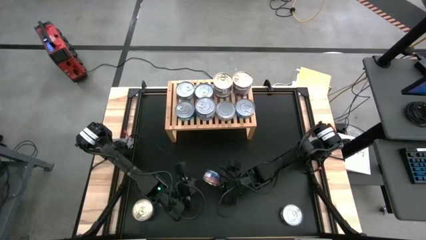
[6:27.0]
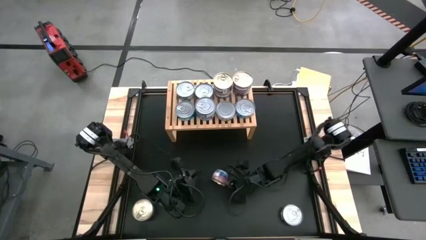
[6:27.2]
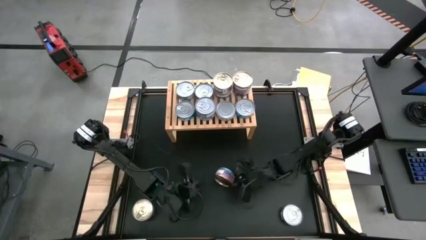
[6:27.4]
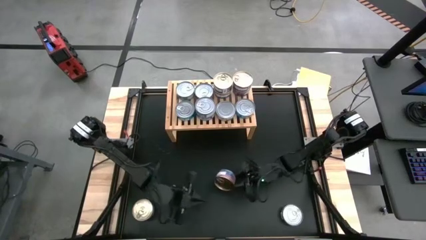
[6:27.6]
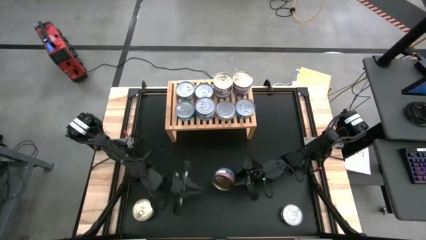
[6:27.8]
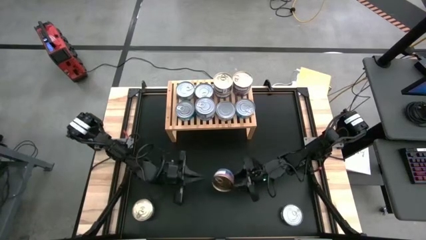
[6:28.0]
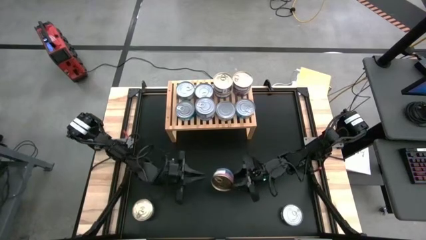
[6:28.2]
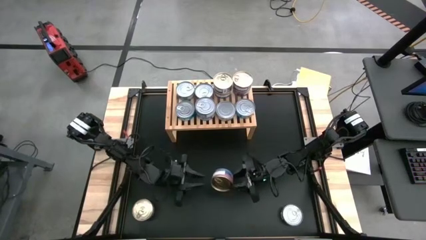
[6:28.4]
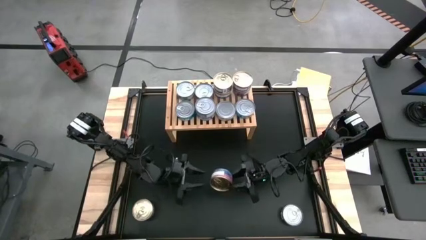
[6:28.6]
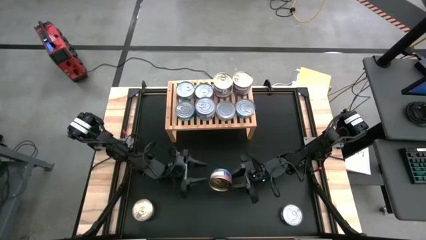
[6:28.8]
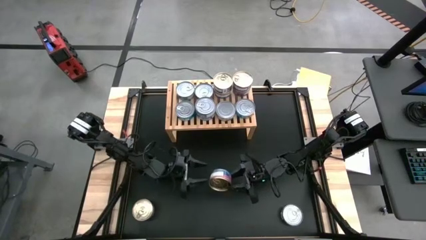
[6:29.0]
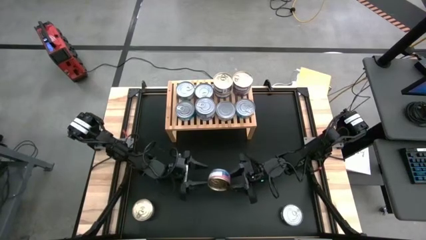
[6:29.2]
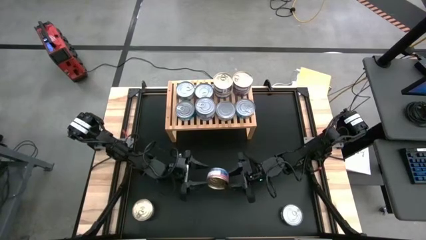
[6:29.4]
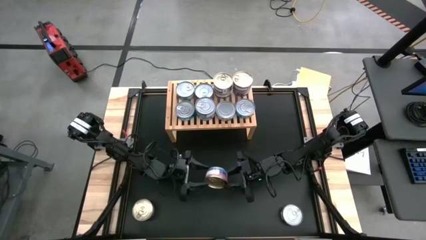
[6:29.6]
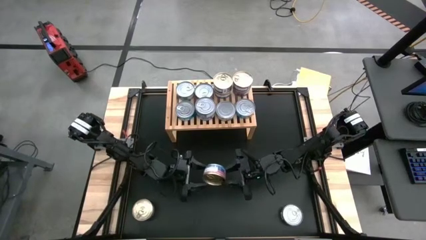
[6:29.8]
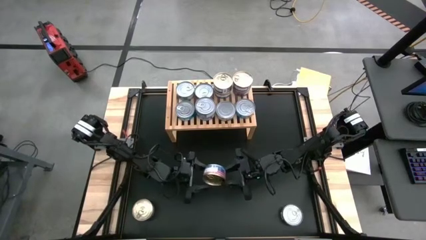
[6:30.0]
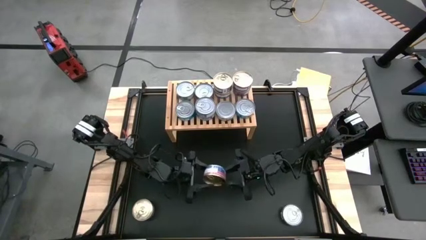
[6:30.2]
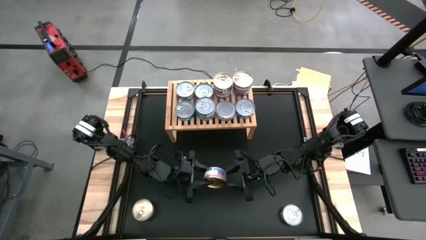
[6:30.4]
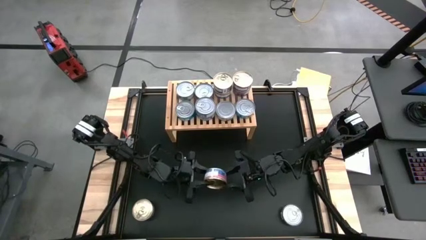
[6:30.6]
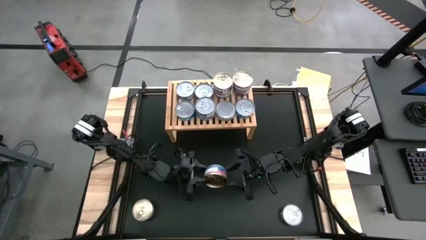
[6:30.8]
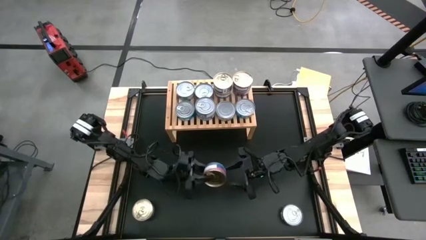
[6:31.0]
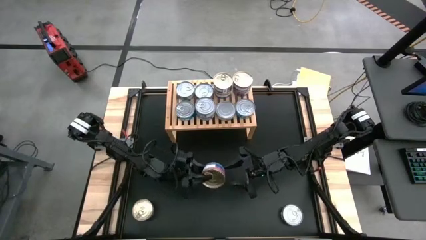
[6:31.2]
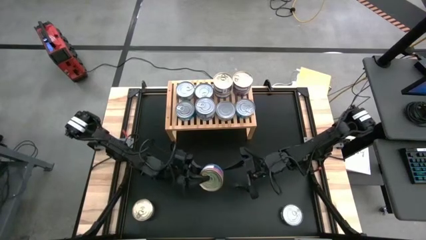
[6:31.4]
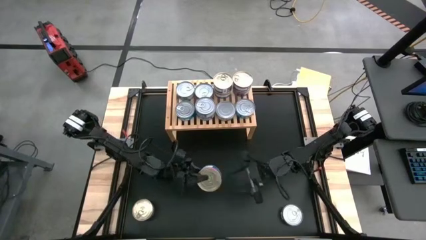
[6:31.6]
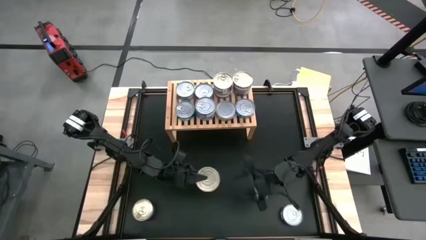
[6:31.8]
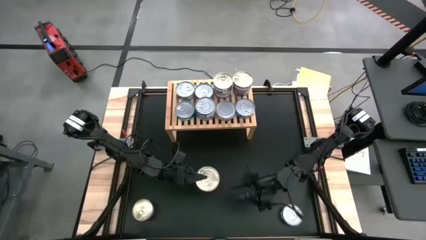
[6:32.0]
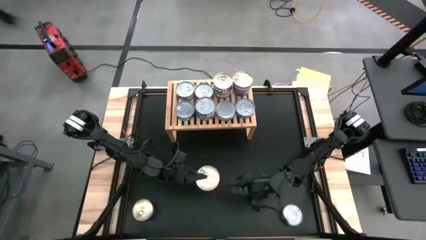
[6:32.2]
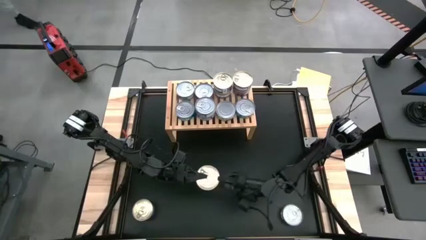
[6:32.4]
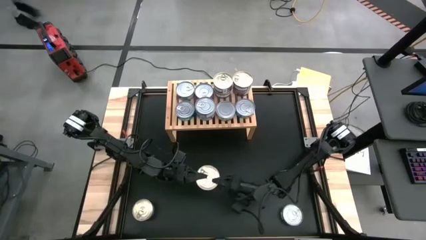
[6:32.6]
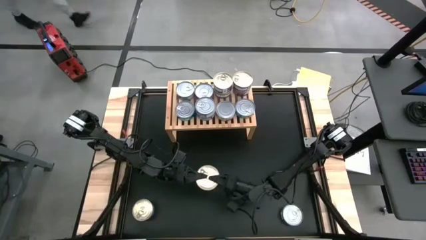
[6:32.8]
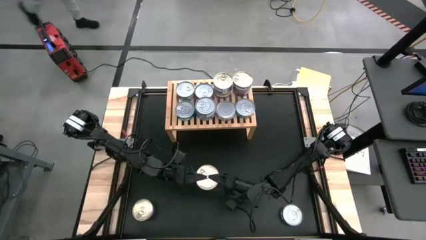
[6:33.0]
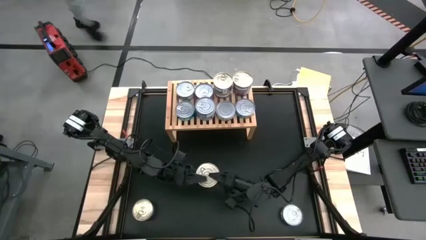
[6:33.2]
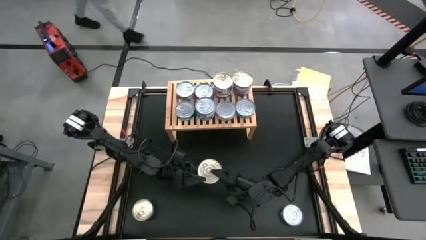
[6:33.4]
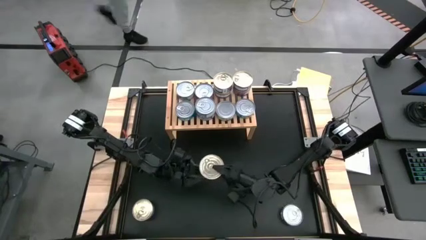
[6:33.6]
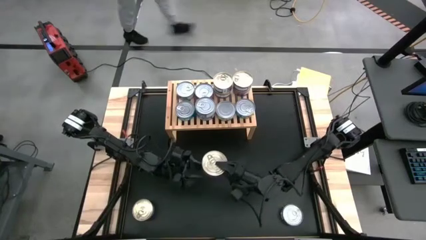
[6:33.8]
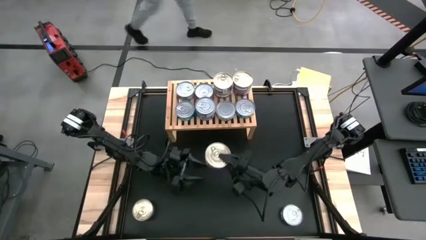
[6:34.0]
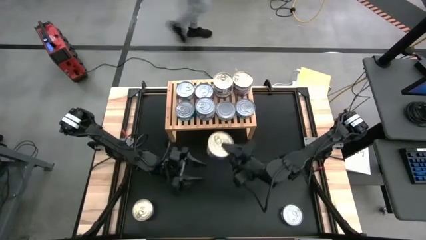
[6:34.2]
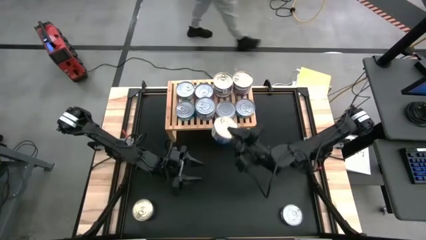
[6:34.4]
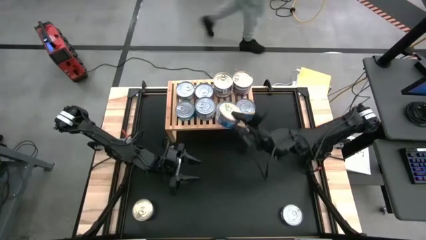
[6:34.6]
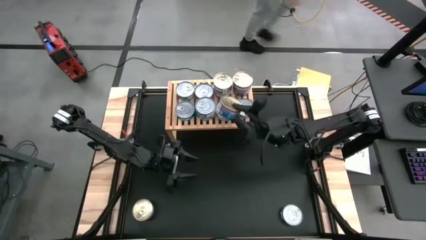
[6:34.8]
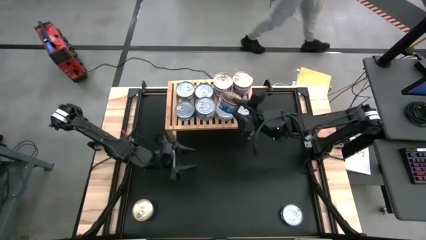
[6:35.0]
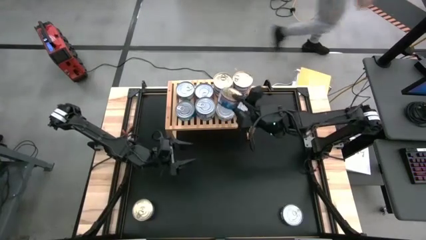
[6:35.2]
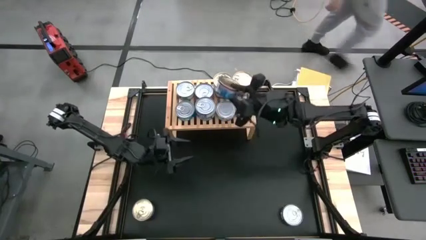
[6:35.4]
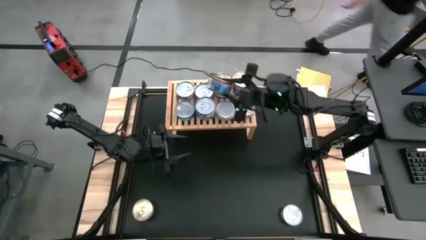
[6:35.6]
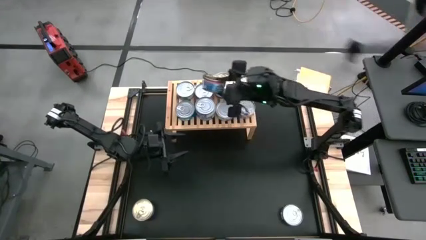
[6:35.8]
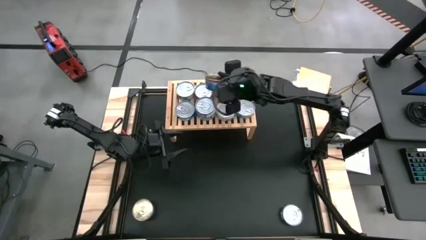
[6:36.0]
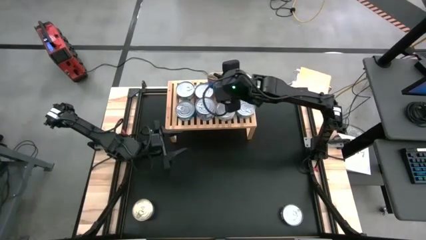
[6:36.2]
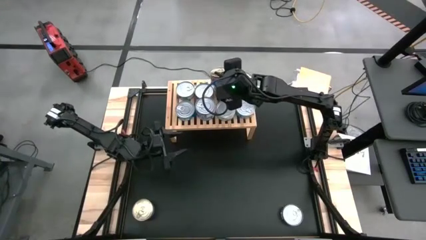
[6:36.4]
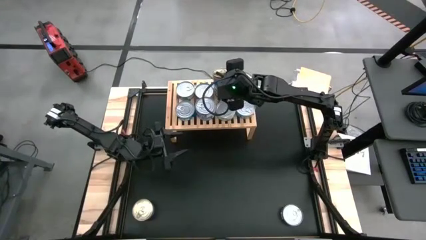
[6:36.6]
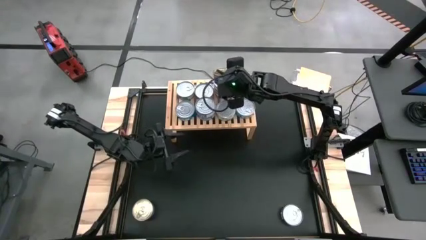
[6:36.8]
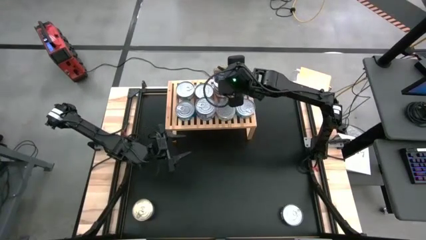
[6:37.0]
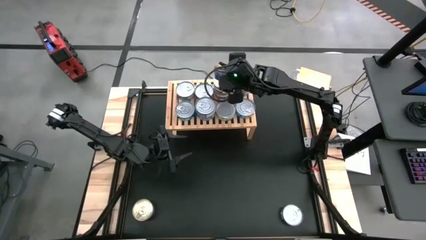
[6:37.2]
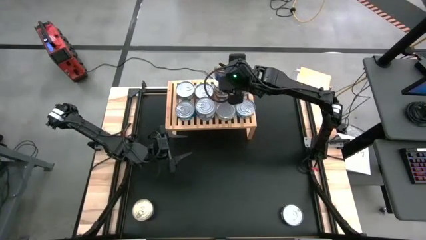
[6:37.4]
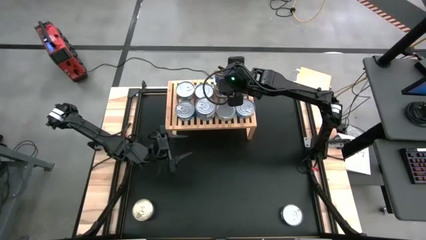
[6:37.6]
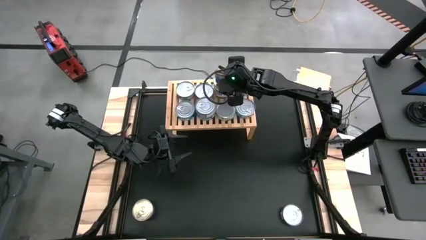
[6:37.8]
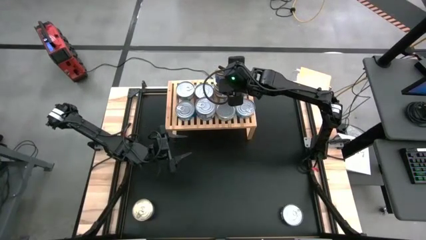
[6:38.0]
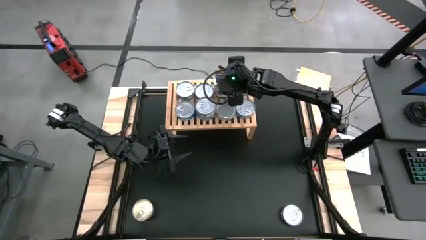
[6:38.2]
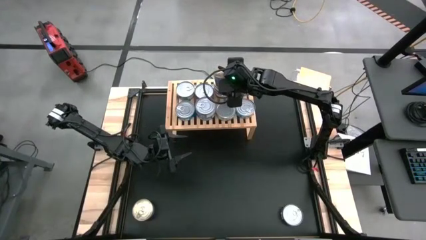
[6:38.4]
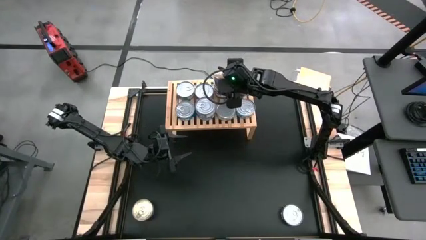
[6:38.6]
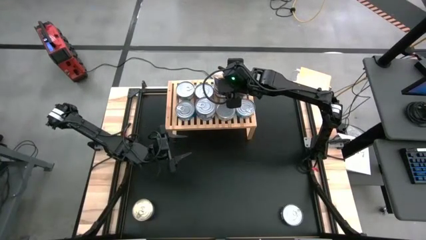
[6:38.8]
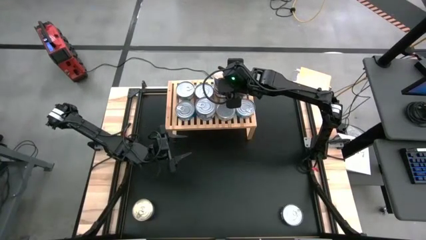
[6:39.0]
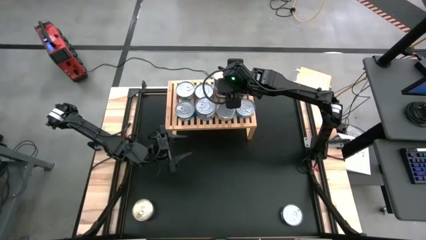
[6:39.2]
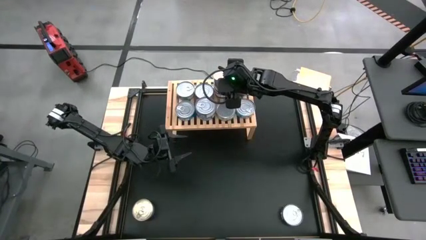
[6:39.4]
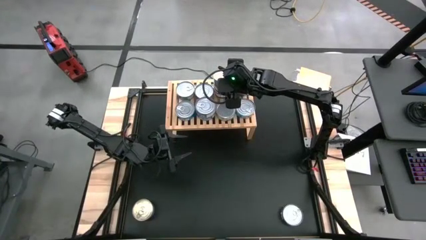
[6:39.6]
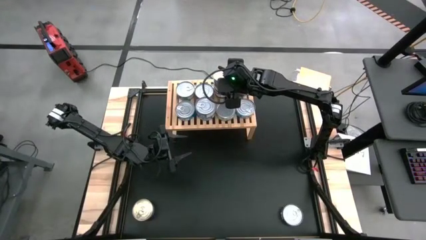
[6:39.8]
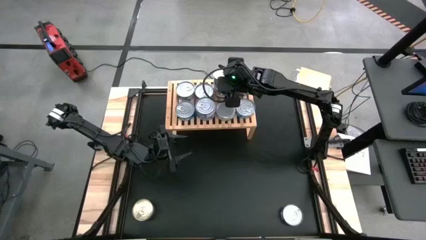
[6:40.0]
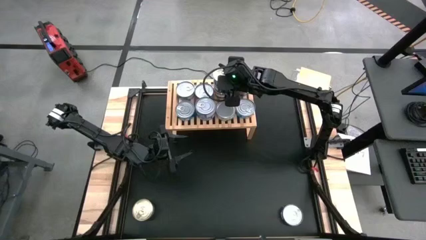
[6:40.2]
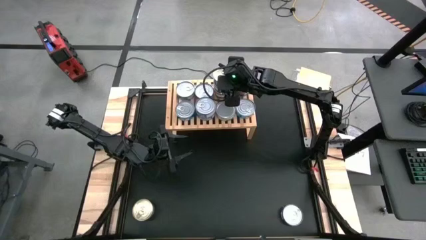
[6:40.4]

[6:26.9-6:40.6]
Task: Stack canned seafood by type on shelf
Stack the blue and pink tuna can on top of the blue and pink tuna can

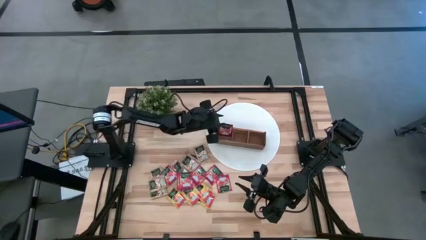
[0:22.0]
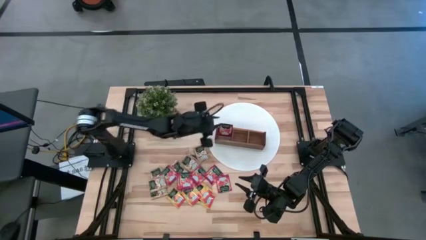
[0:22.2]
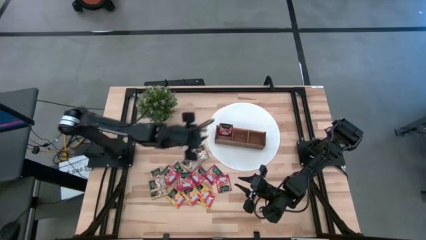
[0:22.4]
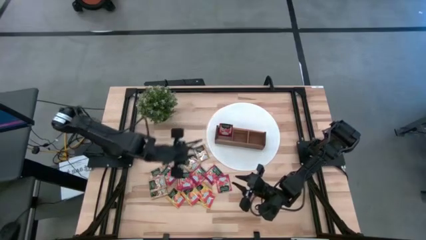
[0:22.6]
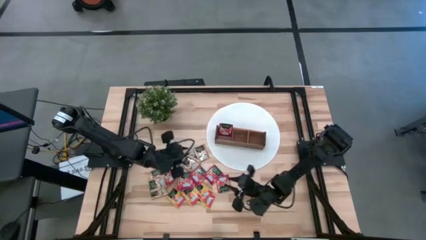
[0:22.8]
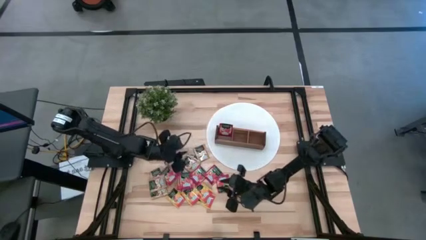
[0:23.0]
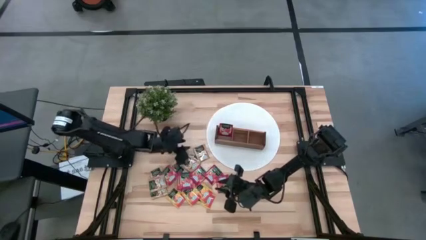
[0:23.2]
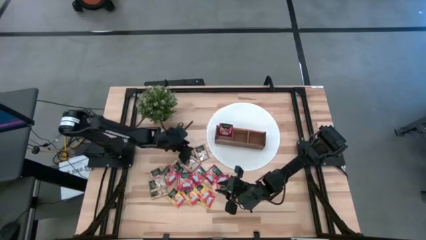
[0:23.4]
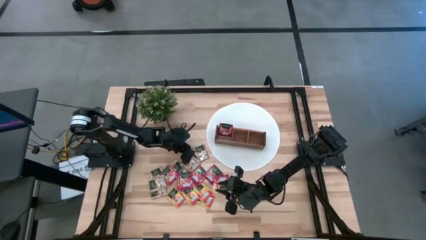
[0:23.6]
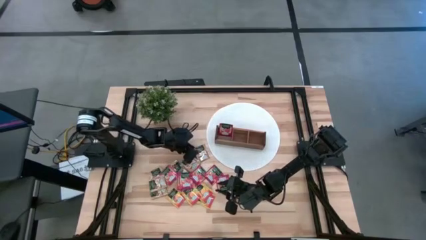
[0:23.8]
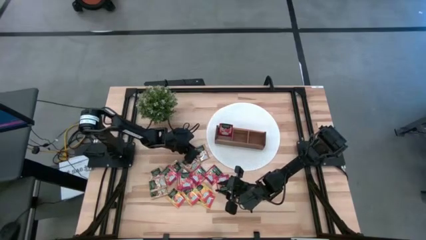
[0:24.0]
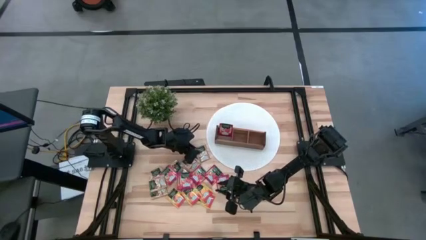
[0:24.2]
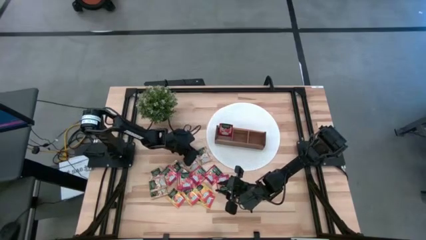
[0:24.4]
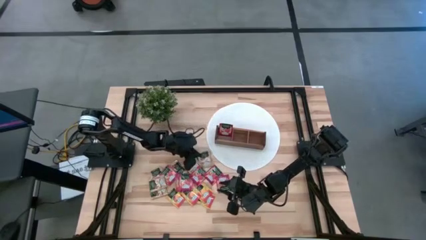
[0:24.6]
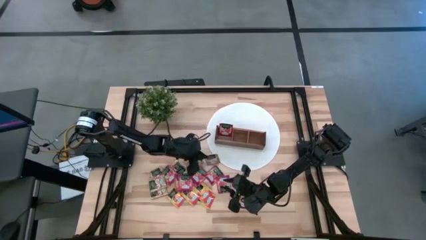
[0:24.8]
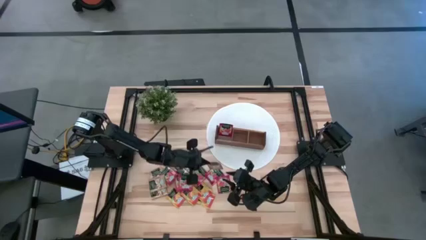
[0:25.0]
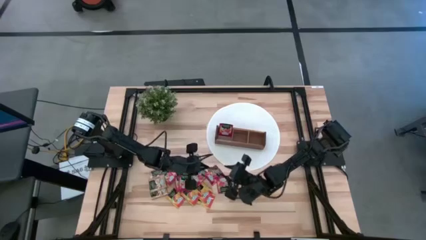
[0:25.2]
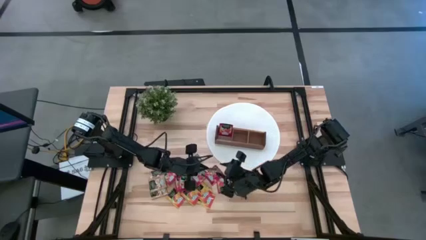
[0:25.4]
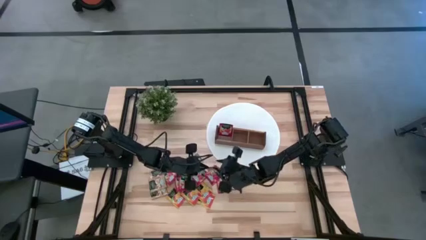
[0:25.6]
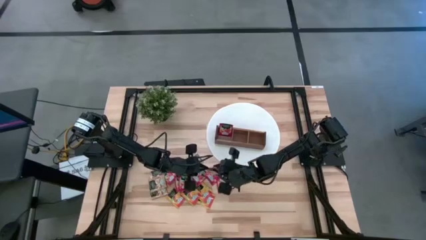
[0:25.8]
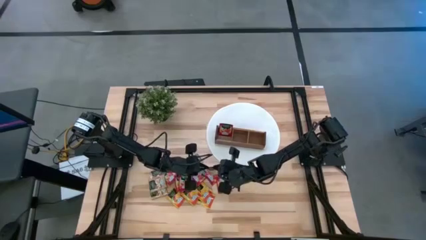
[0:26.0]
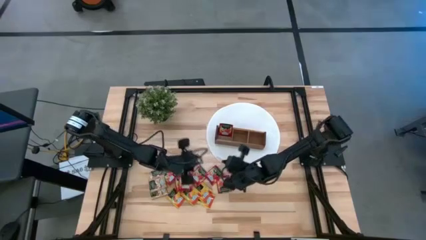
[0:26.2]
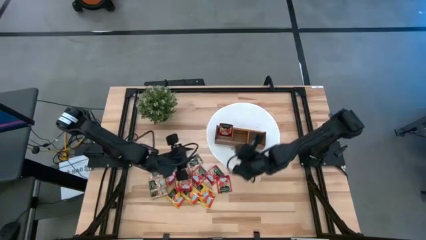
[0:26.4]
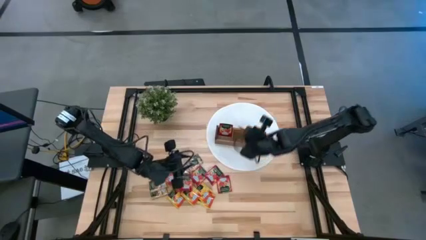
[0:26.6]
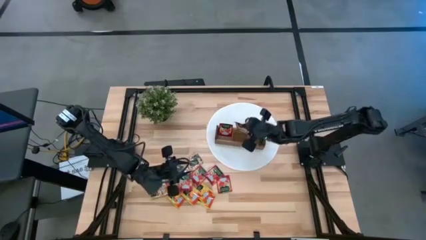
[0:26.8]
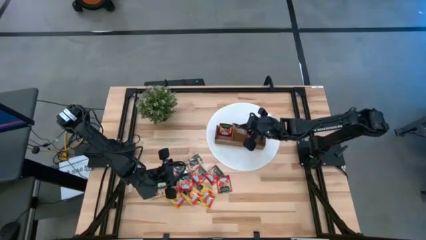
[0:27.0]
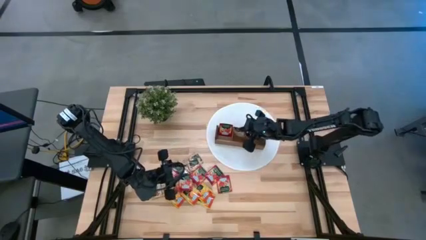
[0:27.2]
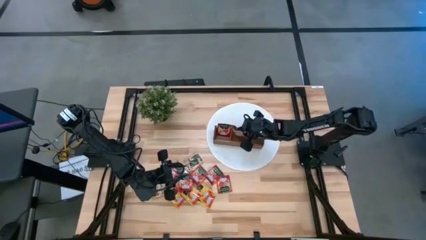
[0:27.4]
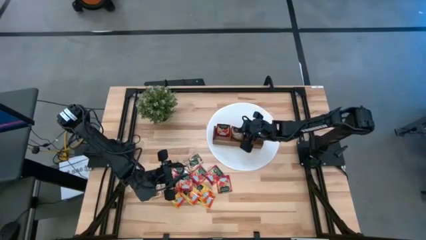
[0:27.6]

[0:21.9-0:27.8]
Task: Pick & Place Tea
Put the brown tea bag into the middle section of the wooden organizer
